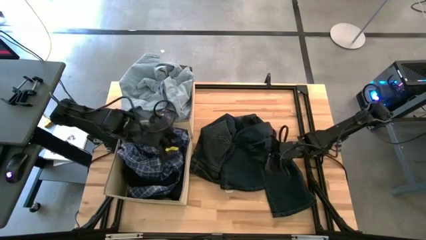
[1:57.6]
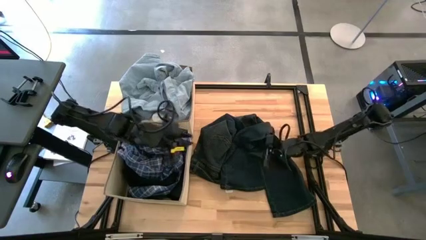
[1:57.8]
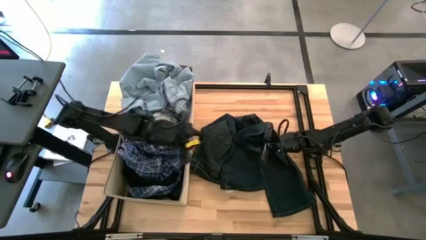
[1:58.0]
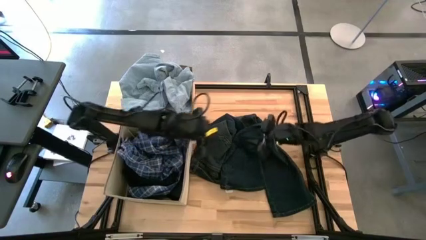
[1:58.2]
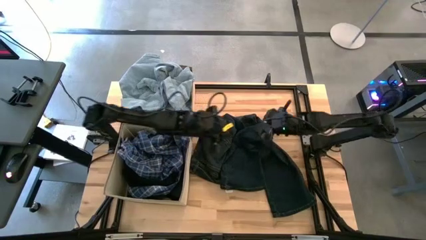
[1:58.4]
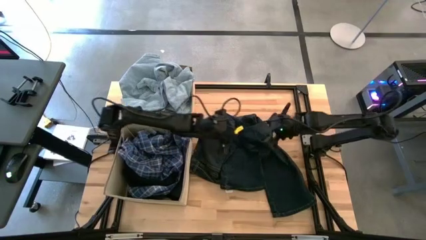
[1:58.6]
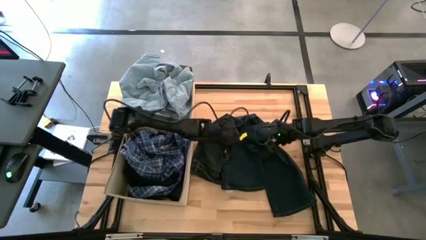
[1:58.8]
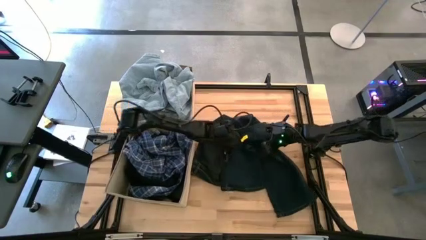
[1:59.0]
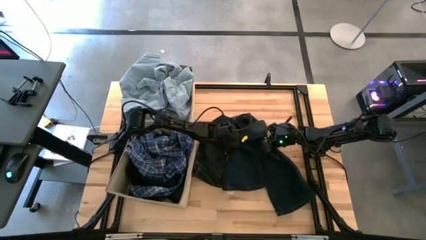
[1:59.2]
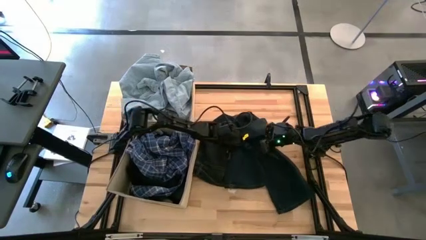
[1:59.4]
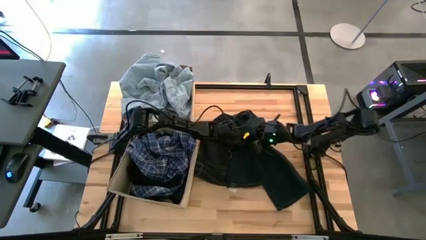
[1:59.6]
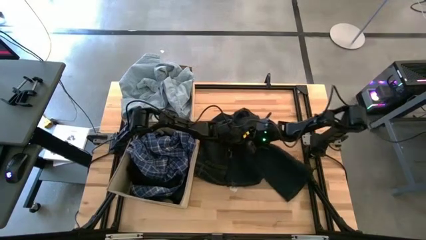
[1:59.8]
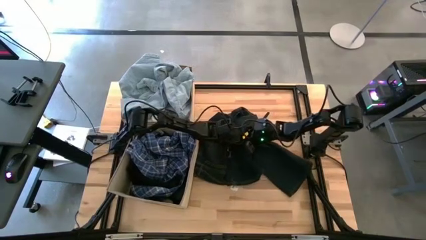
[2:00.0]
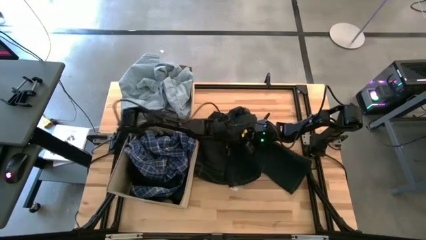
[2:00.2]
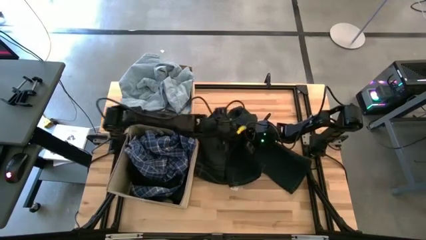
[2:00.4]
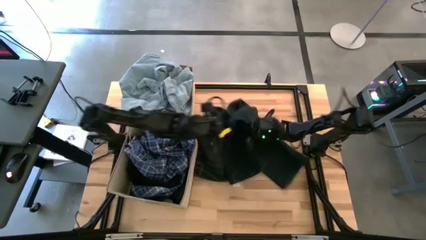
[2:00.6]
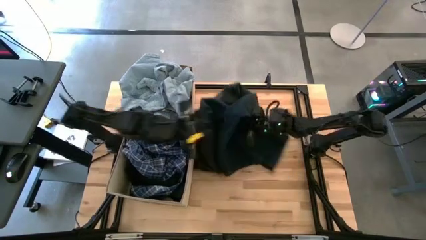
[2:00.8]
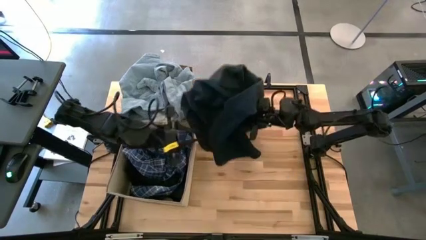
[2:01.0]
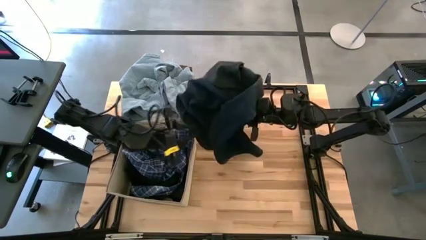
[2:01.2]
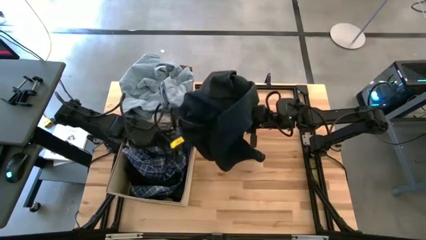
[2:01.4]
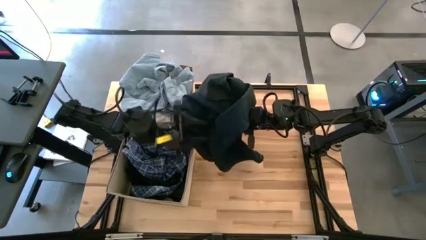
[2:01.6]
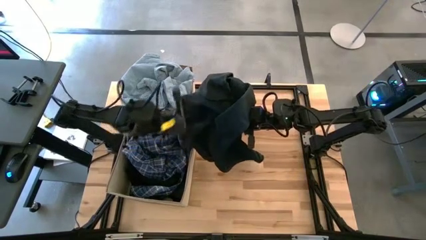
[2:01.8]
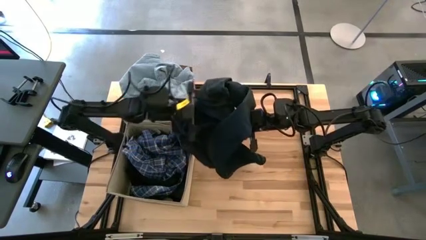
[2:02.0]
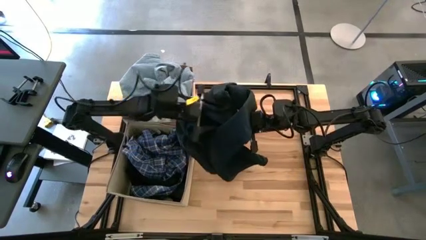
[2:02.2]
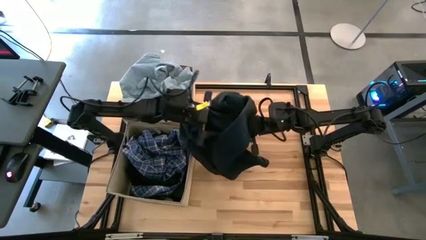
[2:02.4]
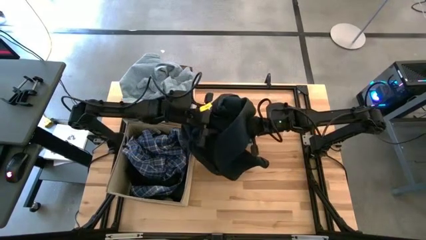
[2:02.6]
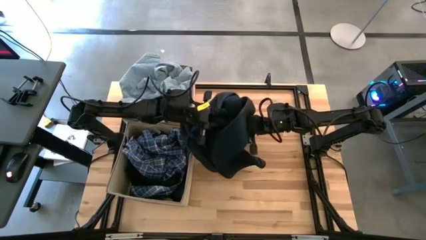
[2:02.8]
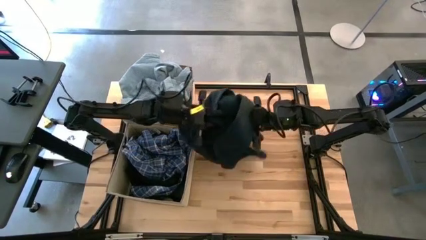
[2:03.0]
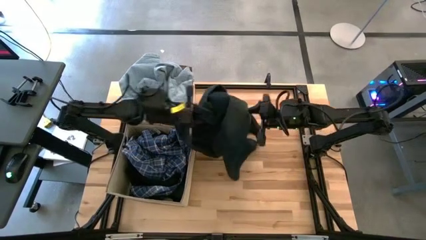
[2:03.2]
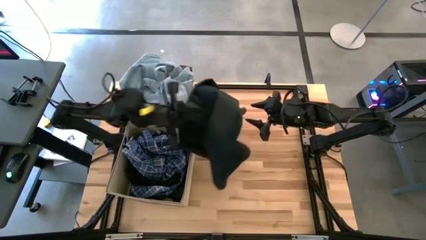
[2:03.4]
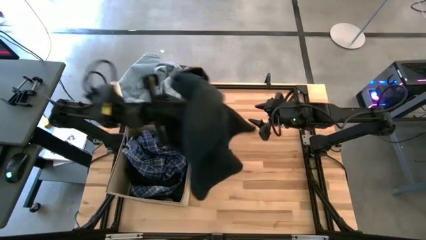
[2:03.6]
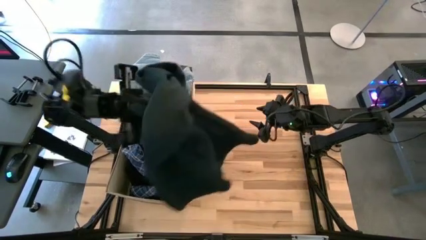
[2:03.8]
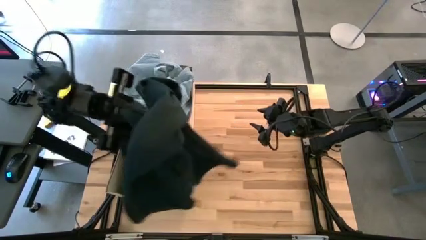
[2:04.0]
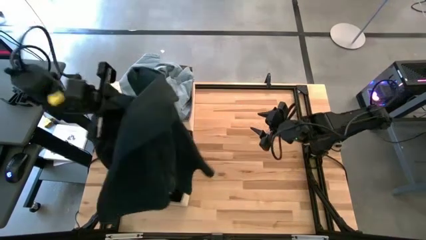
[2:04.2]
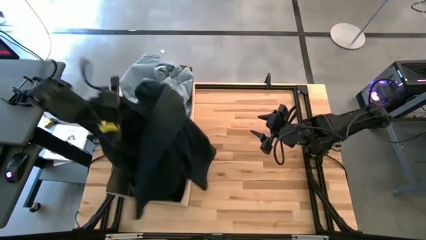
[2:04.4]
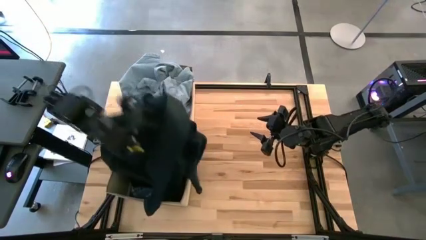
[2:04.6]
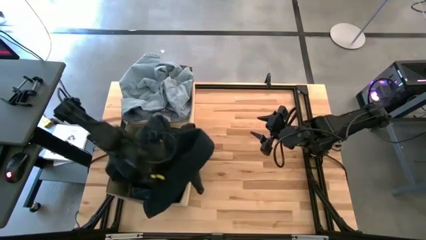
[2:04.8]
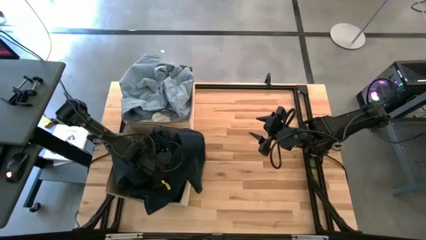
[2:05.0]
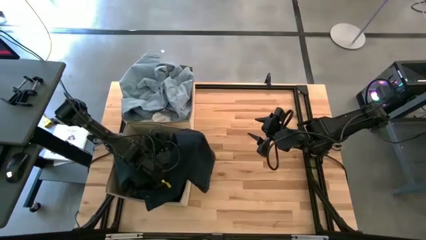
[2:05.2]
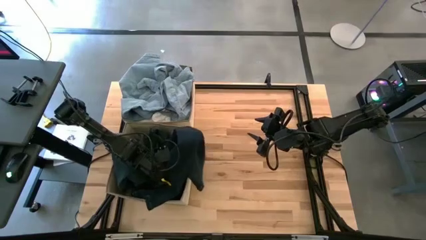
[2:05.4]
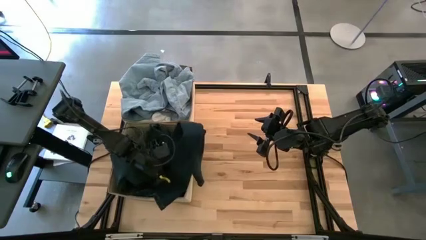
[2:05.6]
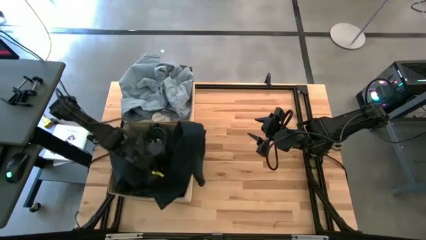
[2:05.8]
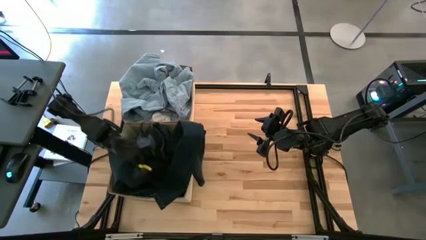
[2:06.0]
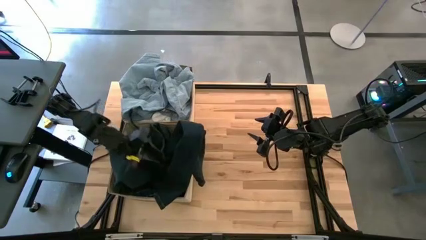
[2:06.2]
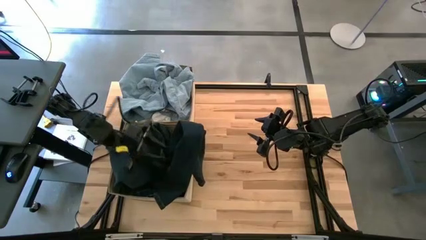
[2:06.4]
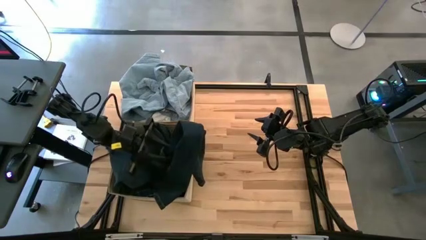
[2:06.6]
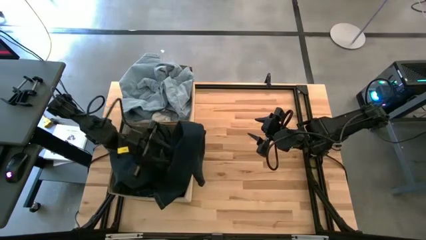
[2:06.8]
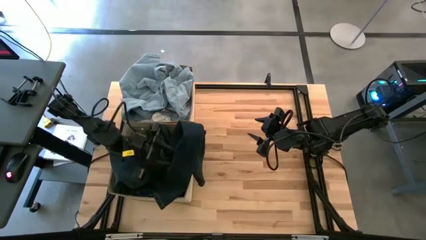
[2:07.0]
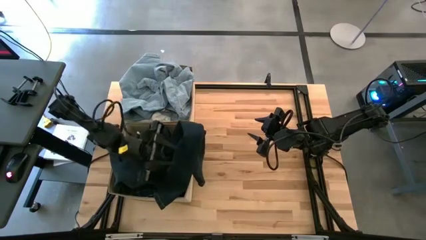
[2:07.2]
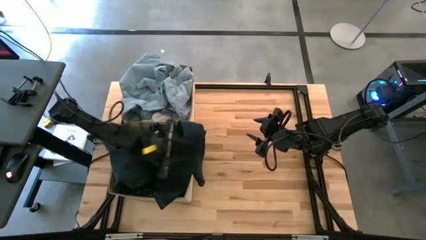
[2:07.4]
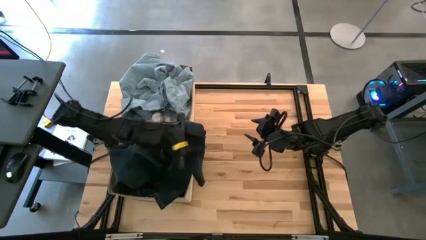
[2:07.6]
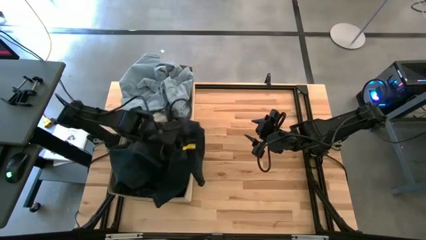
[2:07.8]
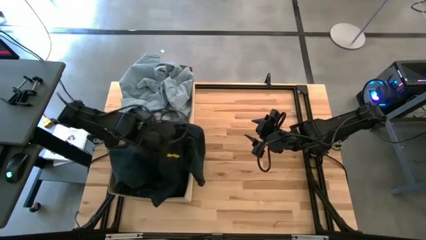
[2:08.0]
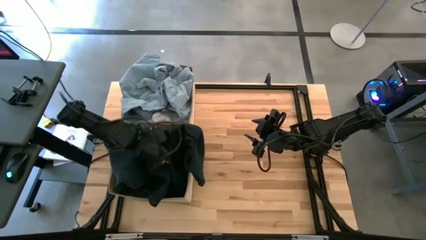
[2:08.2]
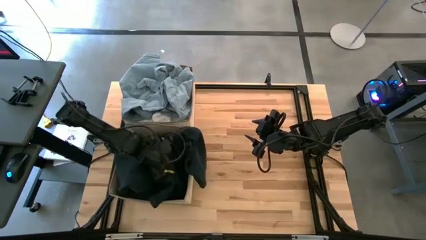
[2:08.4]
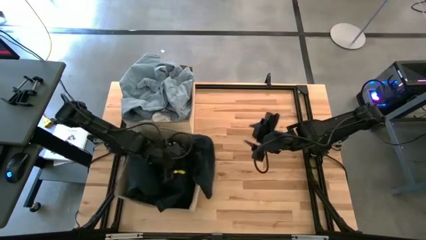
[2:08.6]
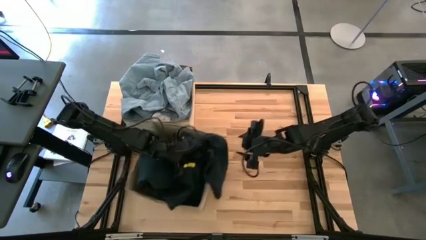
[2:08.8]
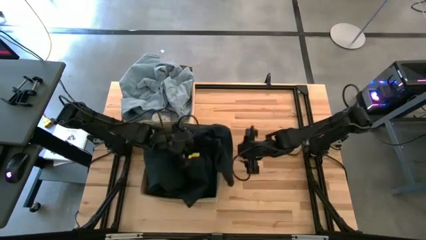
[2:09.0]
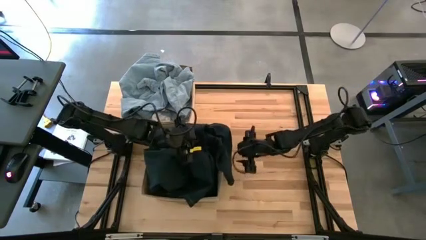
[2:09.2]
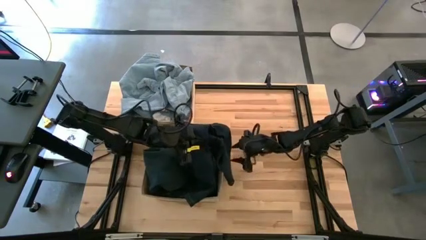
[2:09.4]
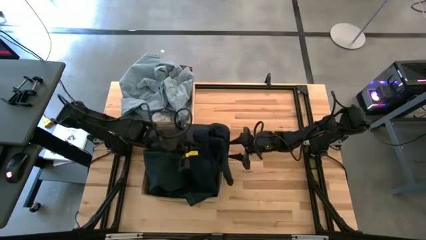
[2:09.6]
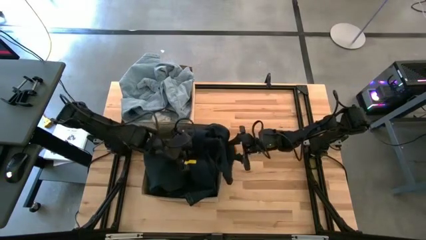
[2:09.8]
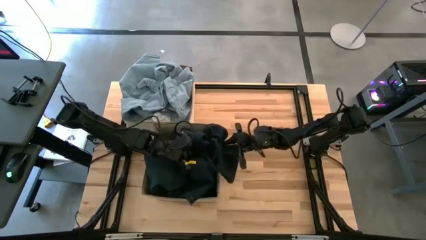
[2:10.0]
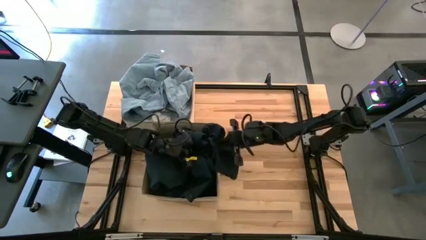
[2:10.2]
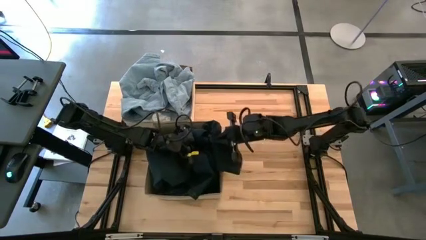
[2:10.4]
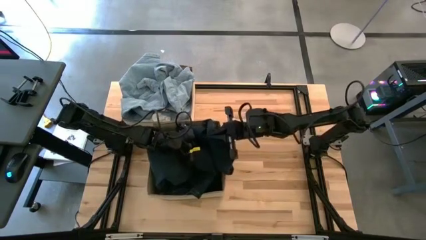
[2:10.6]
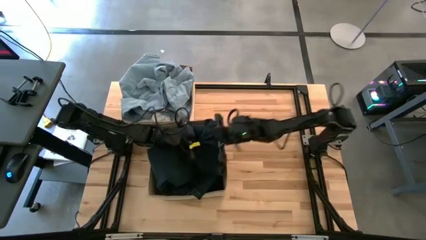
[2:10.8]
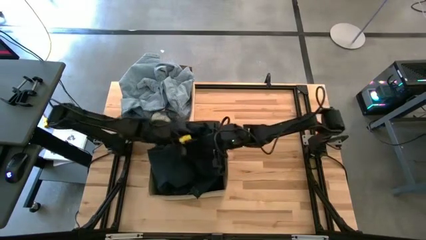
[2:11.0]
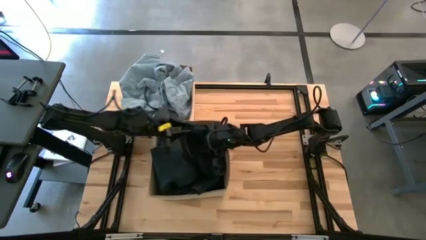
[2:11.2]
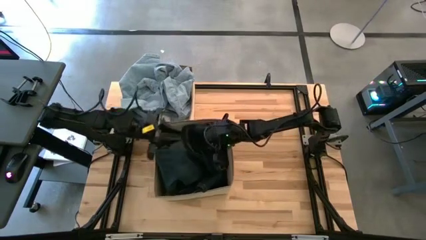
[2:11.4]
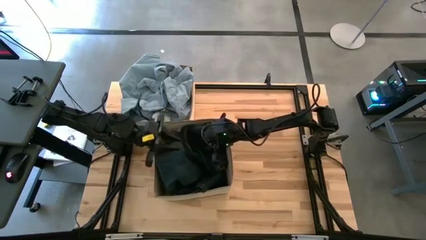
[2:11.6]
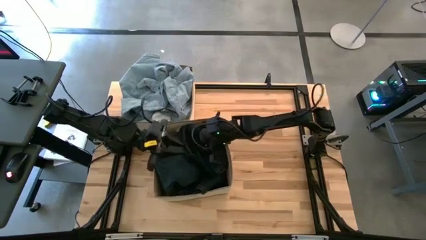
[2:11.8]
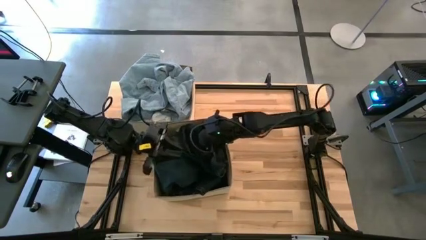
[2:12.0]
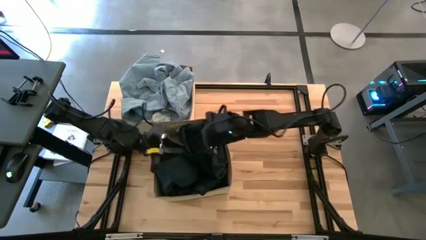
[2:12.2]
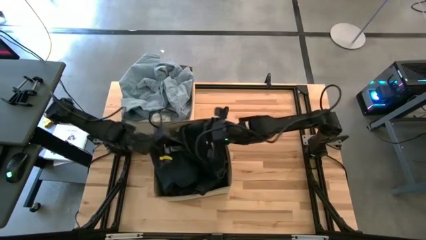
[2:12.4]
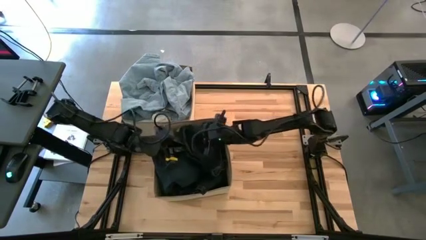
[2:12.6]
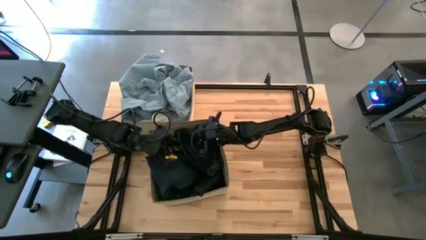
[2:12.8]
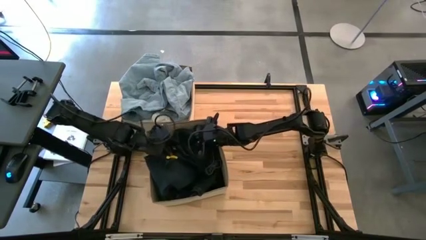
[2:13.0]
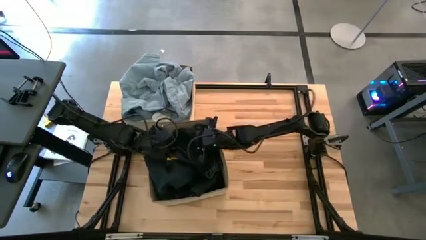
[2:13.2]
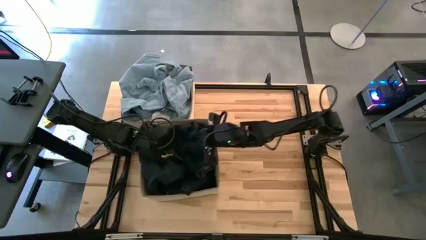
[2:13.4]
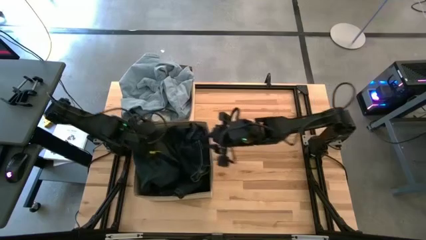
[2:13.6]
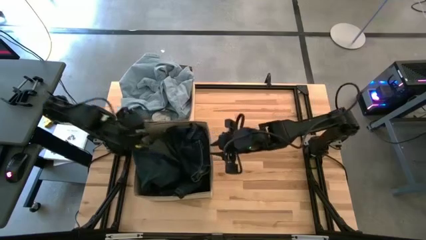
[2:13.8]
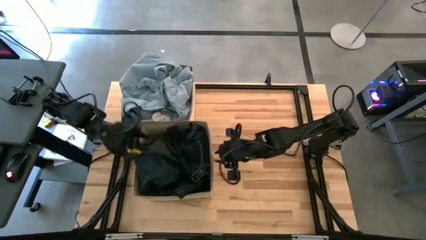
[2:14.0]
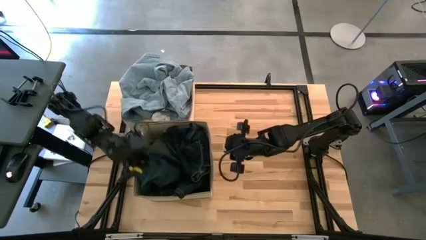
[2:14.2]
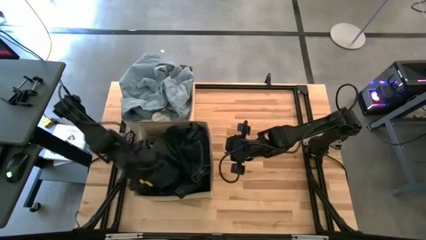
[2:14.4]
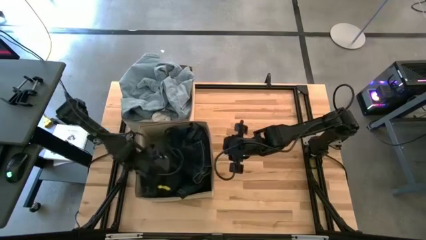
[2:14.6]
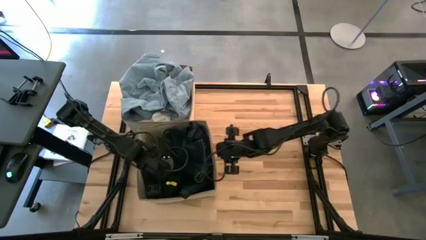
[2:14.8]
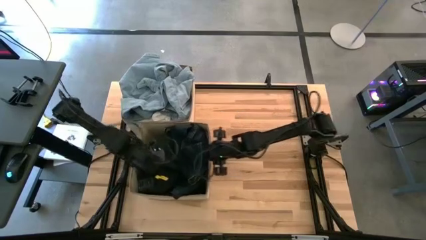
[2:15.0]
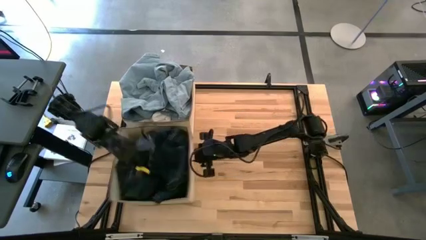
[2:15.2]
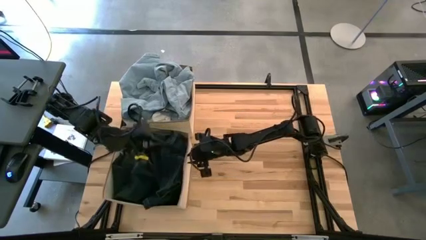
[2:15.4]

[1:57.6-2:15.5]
Task: Sort clothes
Put the black pants into the bottom brown laundry organizer
